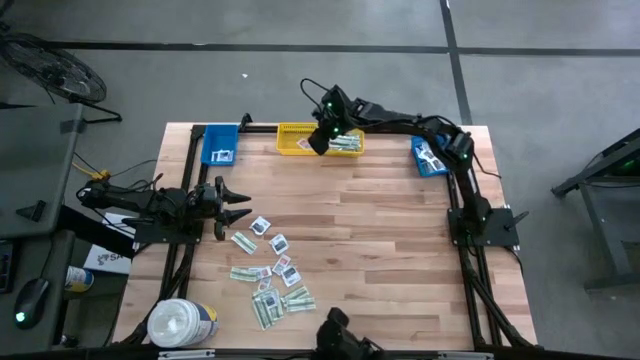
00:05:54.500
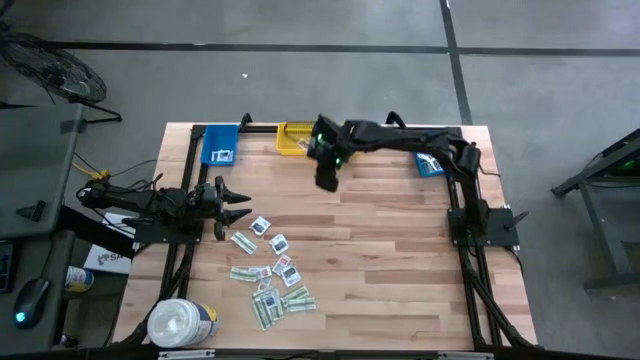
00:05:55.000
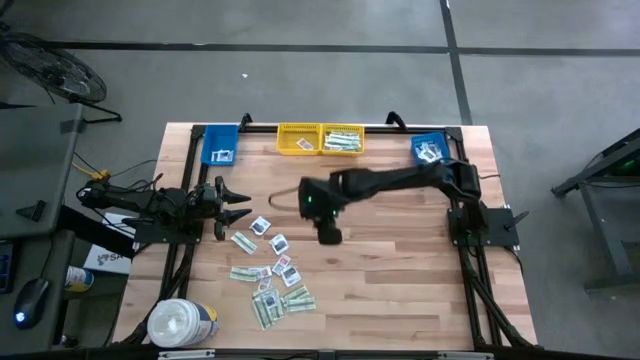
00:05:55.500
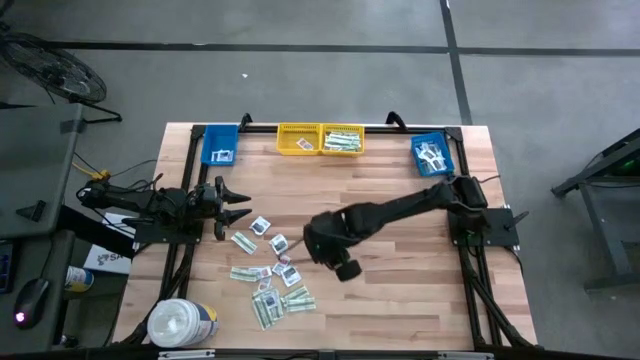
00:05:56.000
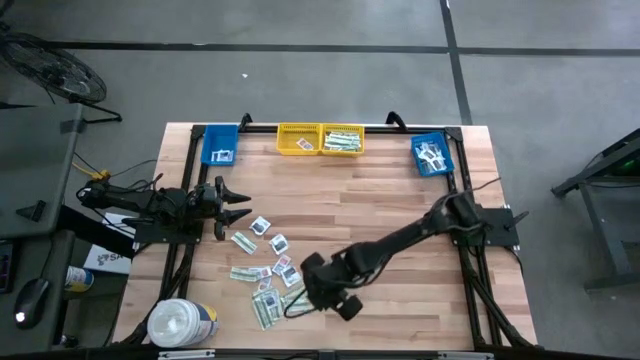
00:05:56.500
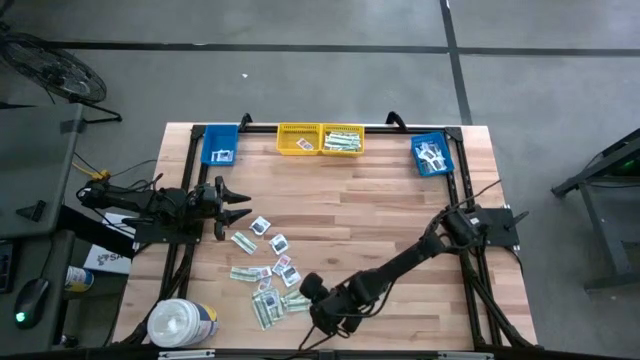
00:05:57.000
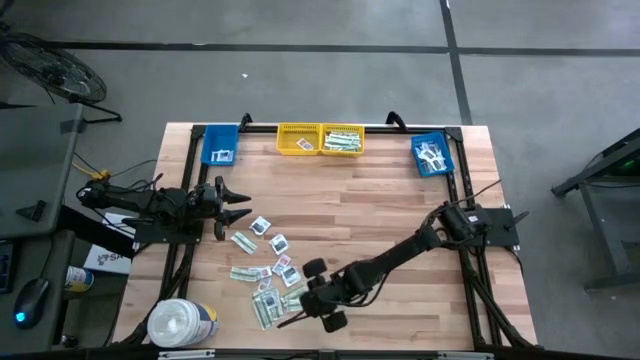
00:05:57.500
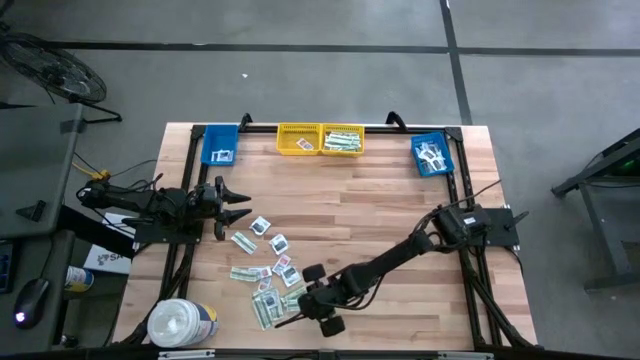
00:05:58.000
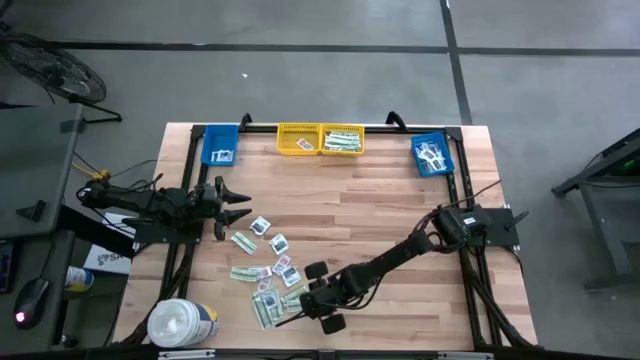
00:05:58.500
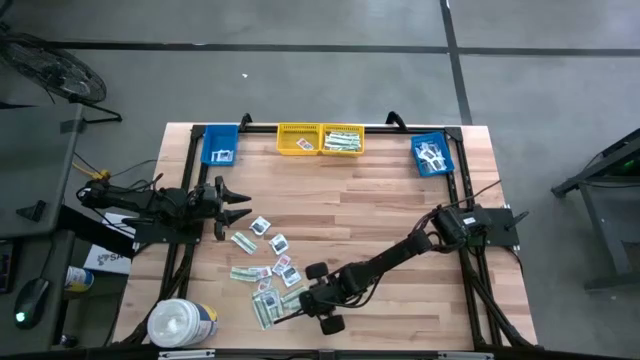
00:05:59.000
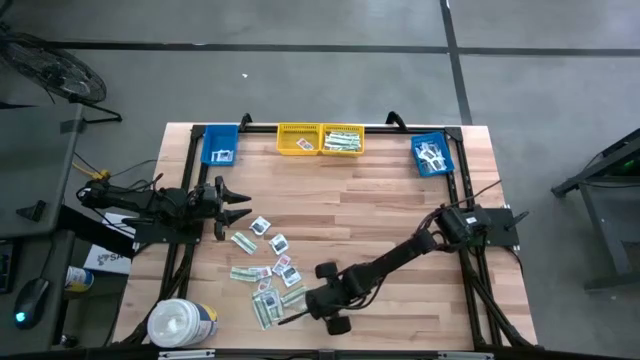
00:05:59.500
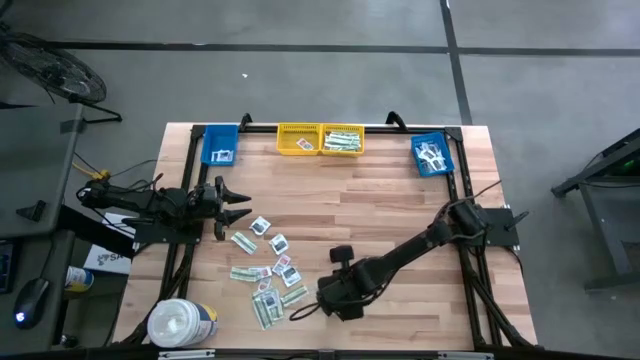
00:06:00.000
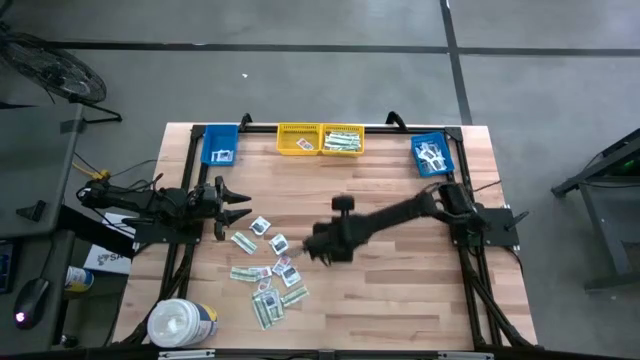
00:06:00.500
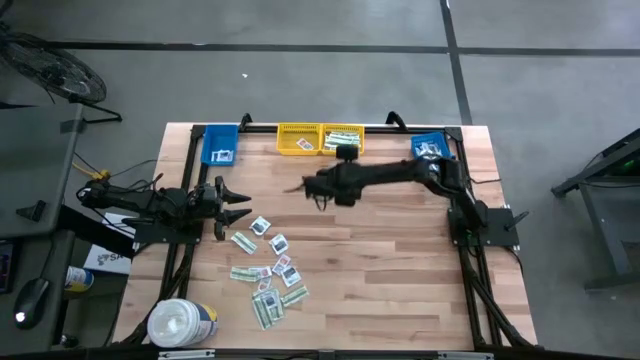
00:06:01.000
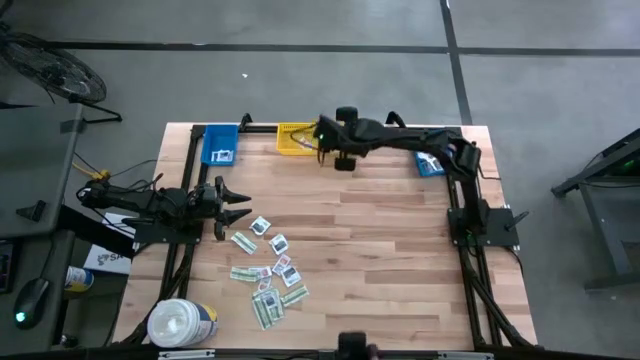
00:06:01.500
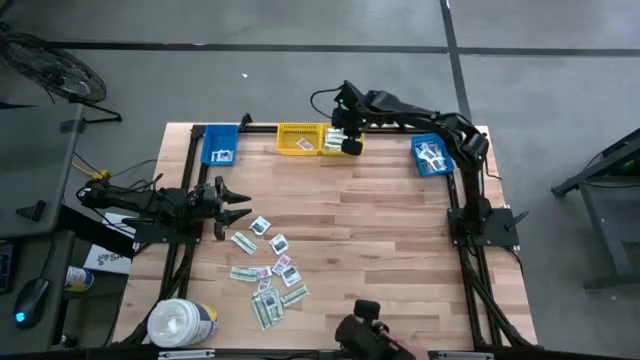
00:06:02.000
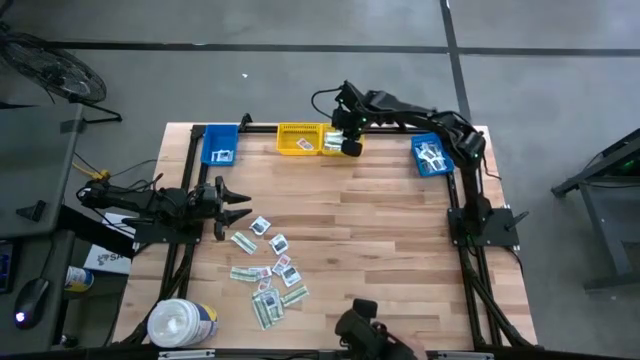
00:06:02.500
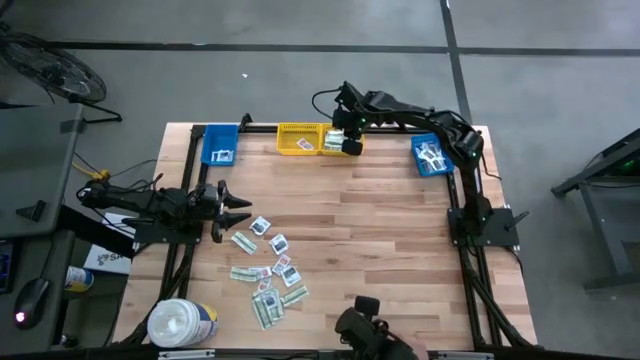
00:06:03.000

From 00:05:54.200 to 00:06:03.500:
Task: Pick & Place First Aid Supplies
Put the green bandage pack into the right yellow bin

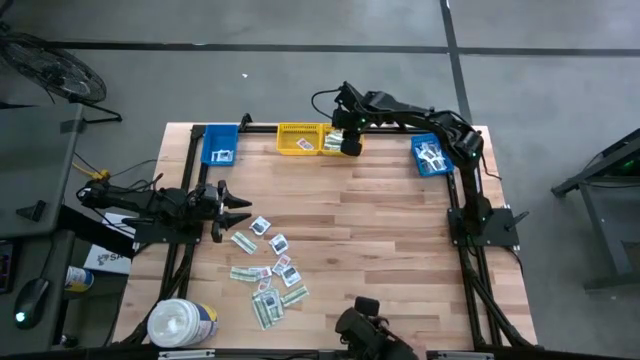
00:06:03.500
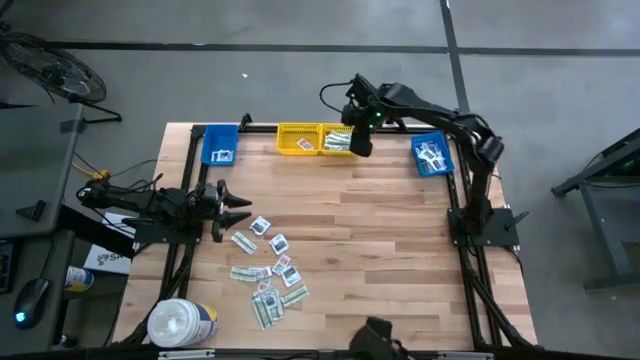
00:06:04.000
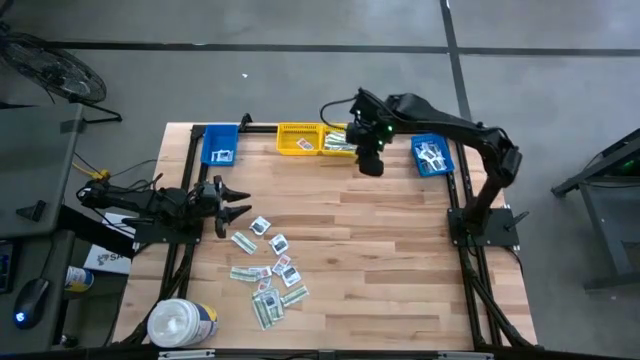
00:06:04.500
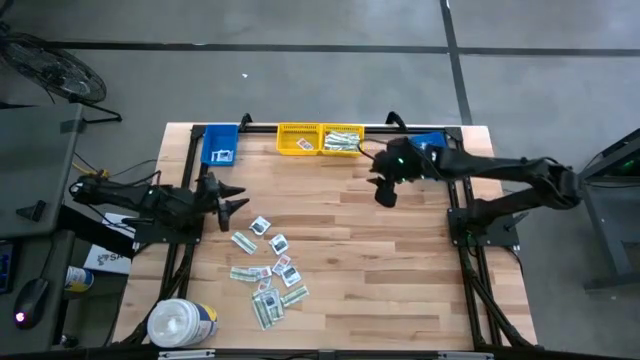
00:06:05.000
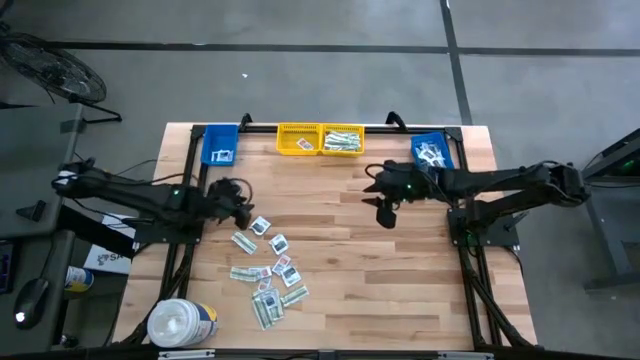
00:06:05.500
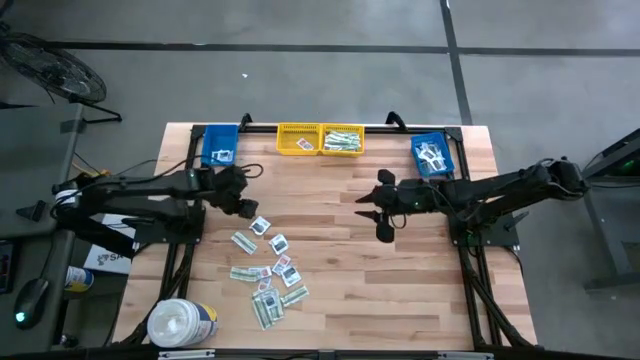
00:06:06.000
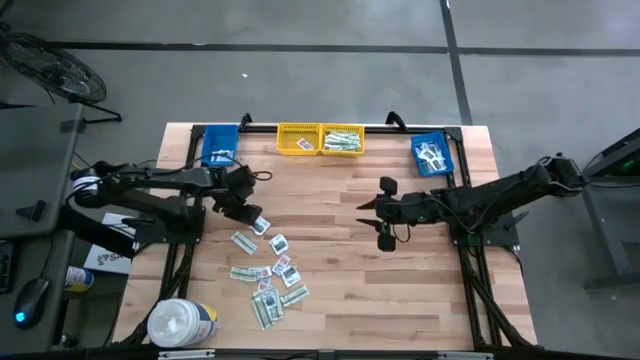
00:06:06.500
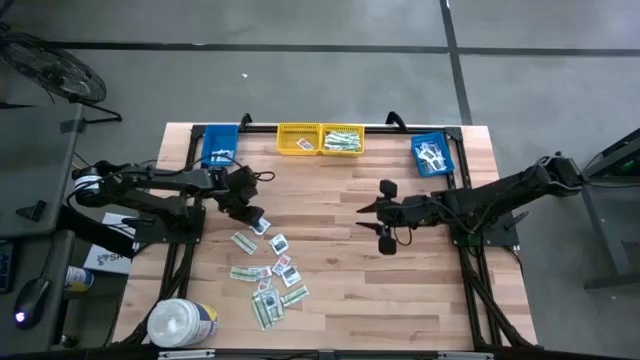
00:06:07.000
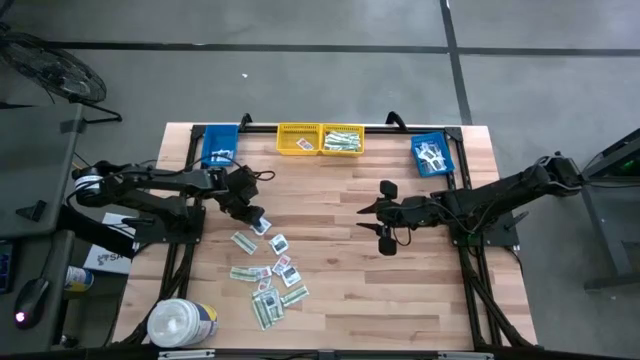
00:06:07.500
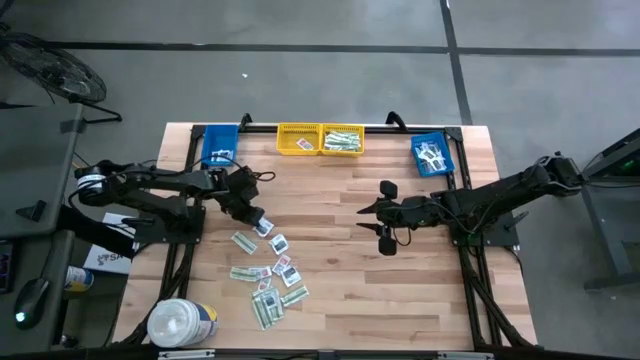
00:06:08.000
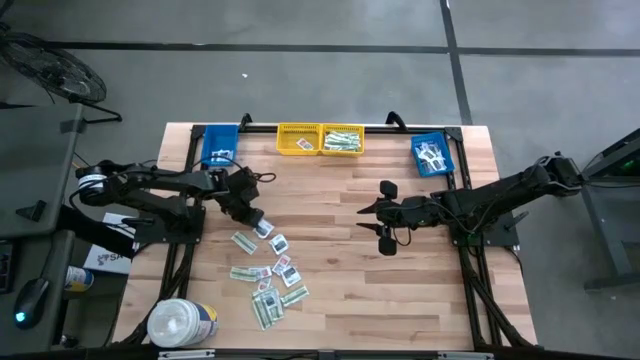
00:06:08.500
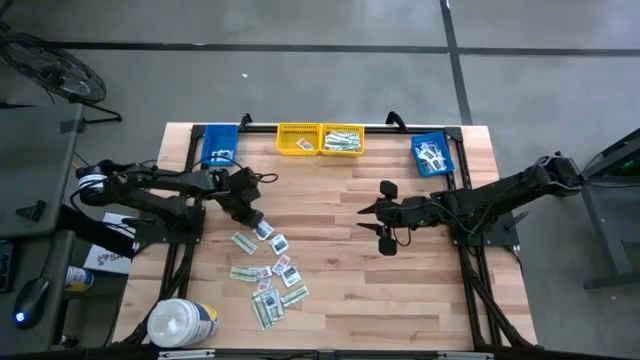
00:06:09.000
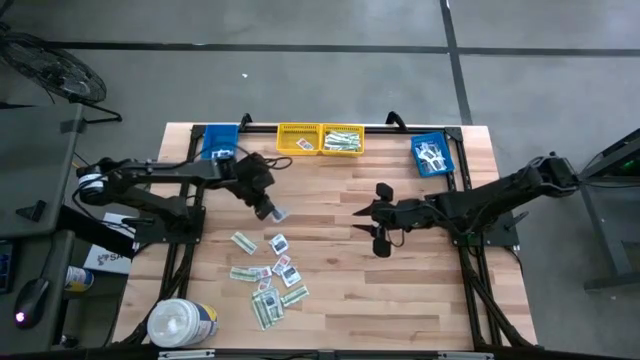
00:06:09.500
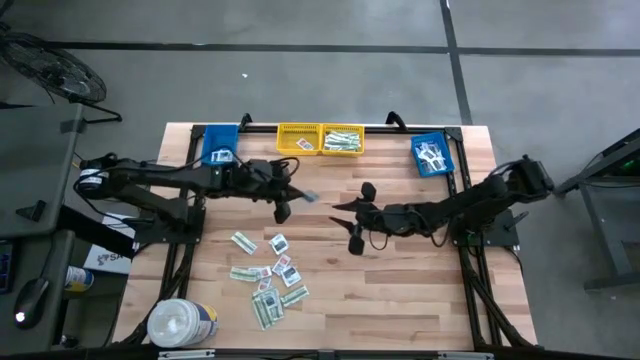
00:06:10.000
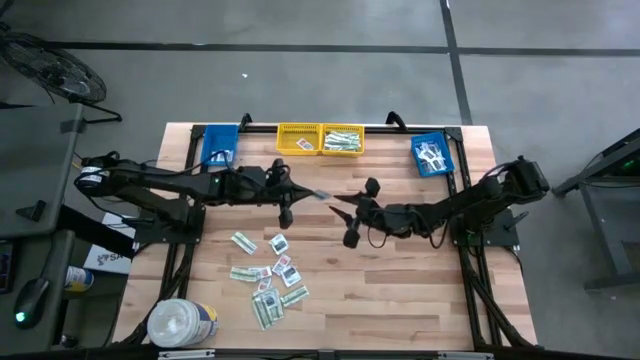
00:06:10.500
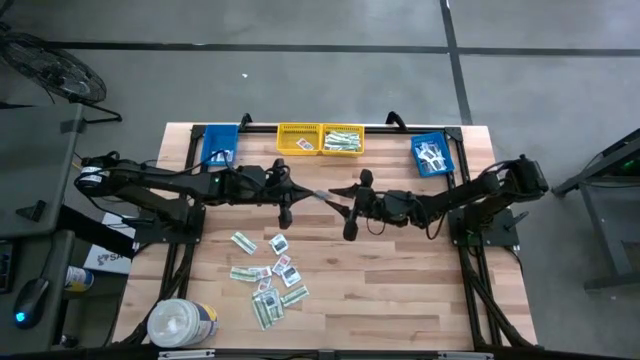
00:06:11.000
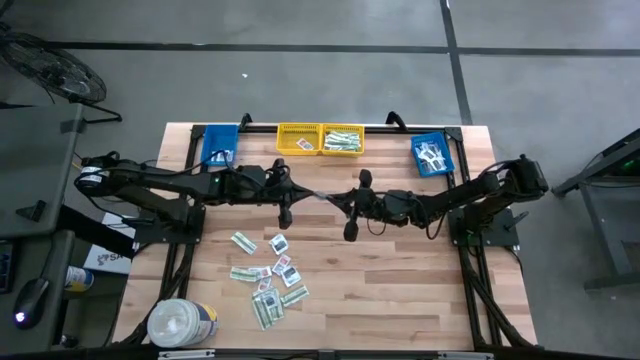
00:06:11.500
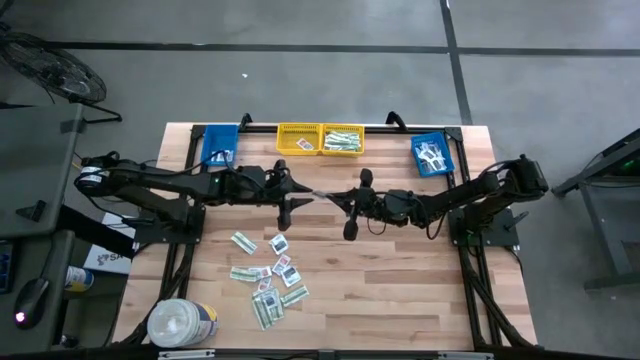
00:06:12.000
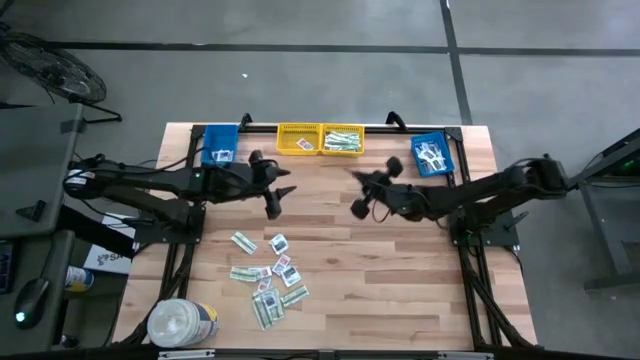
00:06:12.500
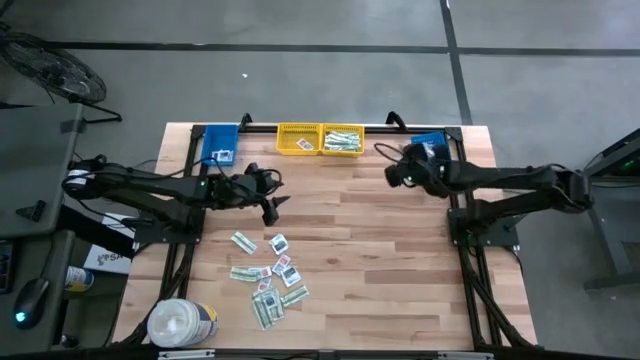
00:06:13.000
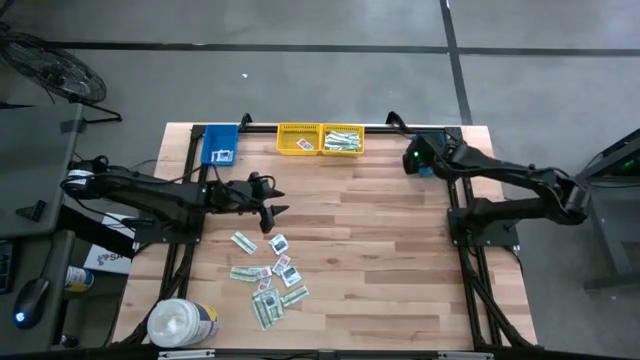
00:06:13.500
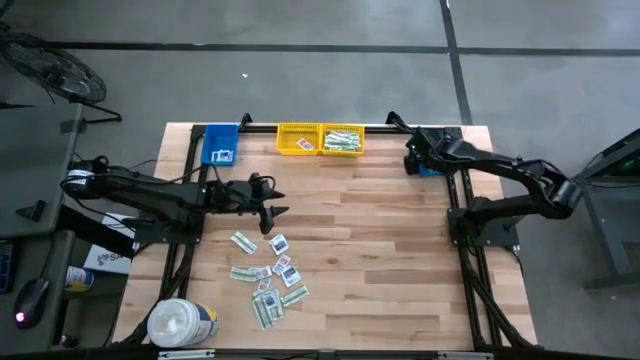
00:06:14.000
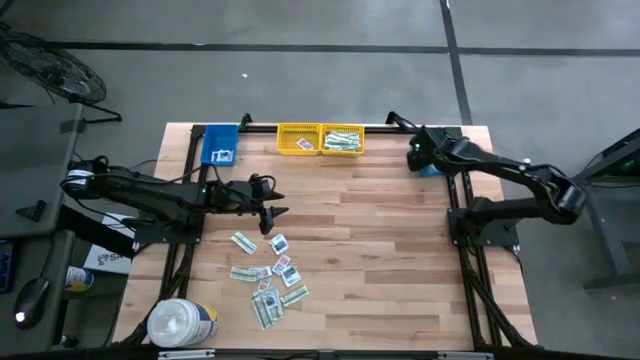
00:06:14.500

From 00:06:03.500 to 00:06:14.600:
Put the black towelette pack into the right blue bin
